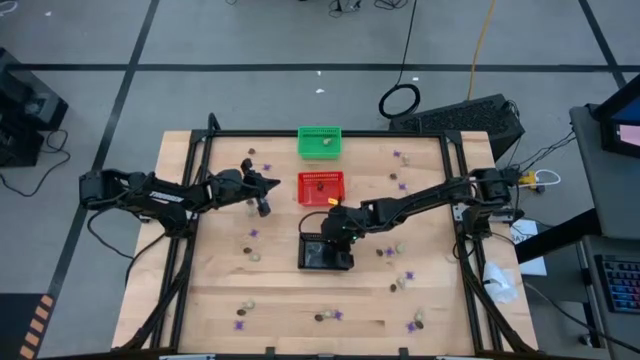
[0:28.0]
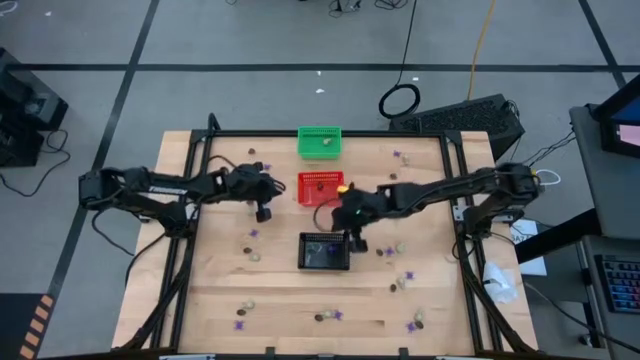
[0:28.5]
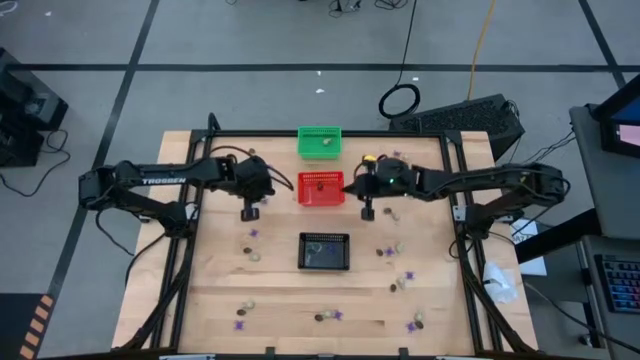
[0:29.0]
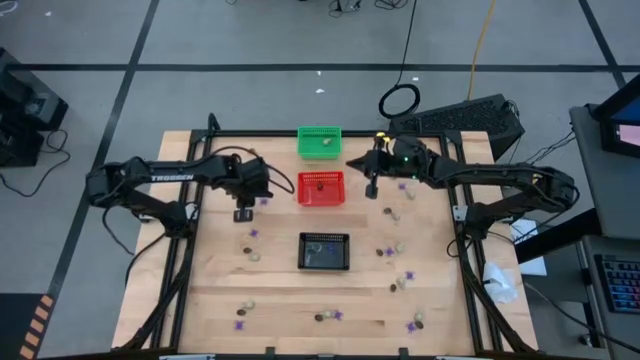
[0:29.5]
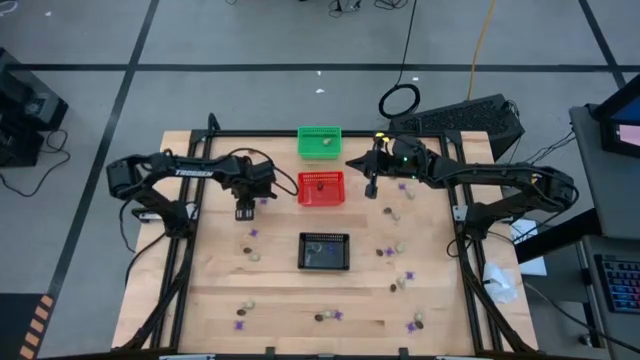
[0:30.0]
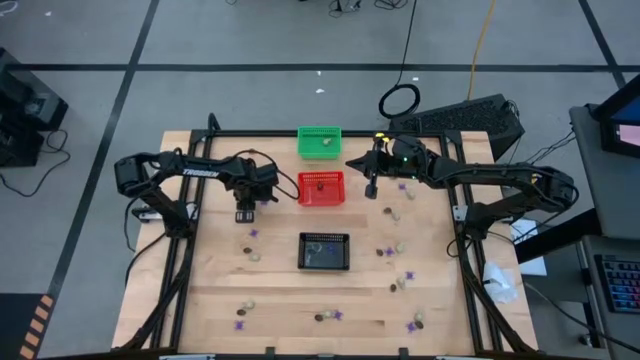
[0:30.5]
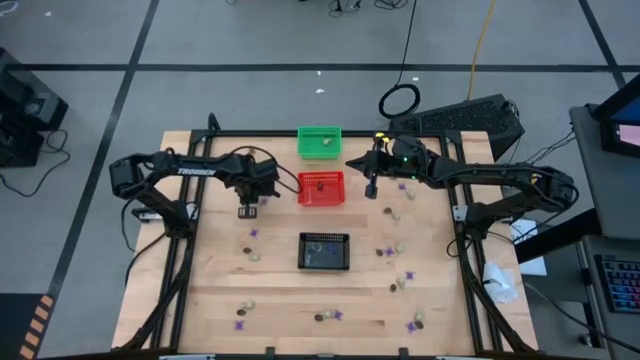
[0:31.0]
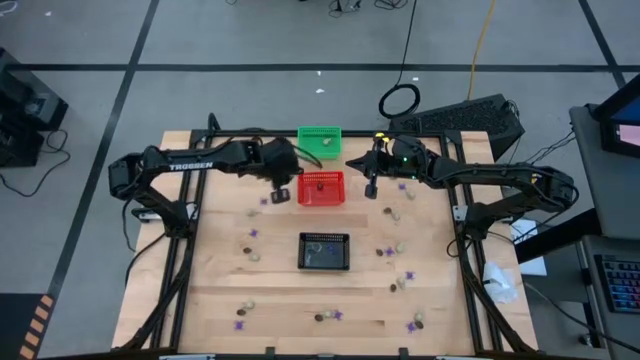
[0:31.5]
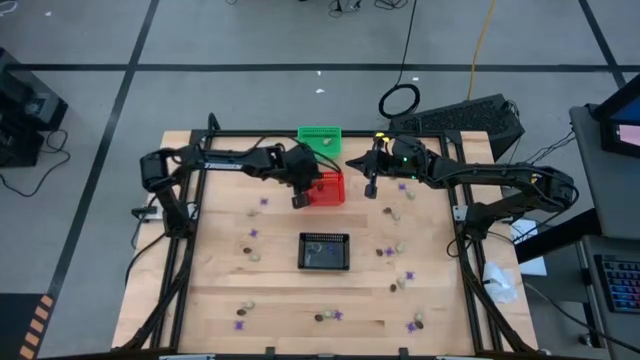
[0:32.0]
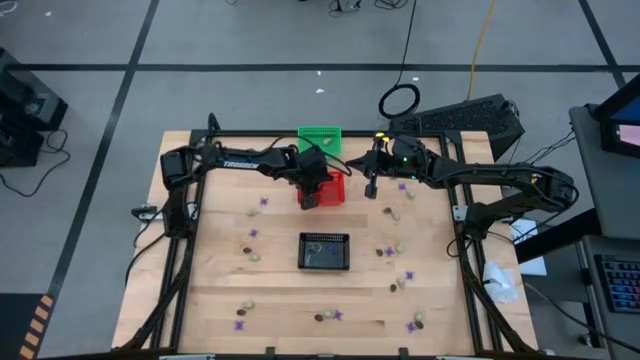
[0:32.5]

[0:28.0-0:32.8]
Task: Sort Halloween decoration
Put the black skull toy into the red basket

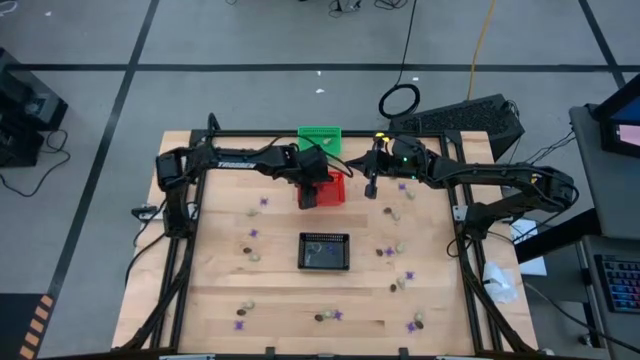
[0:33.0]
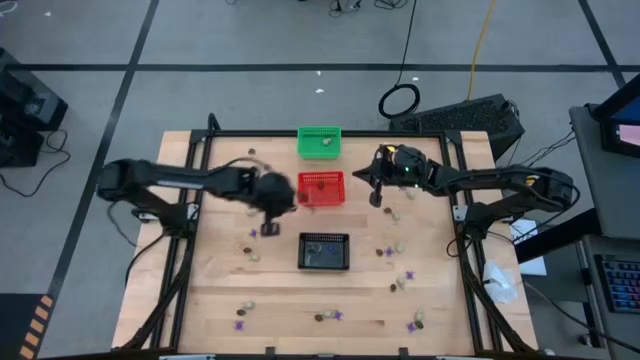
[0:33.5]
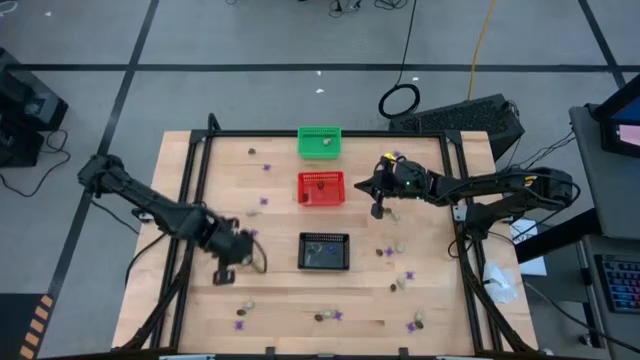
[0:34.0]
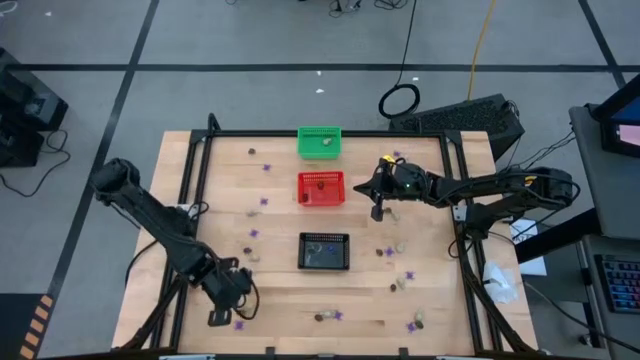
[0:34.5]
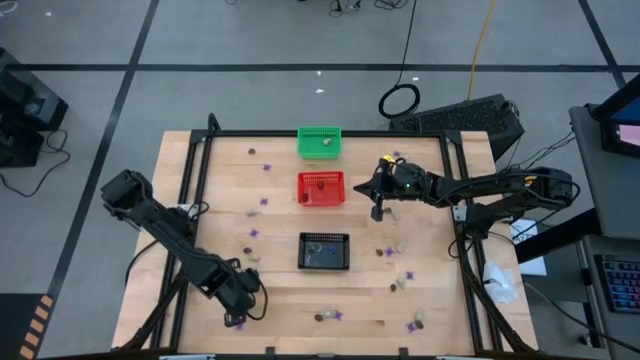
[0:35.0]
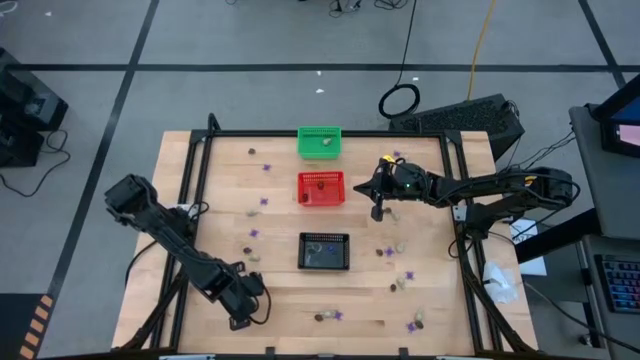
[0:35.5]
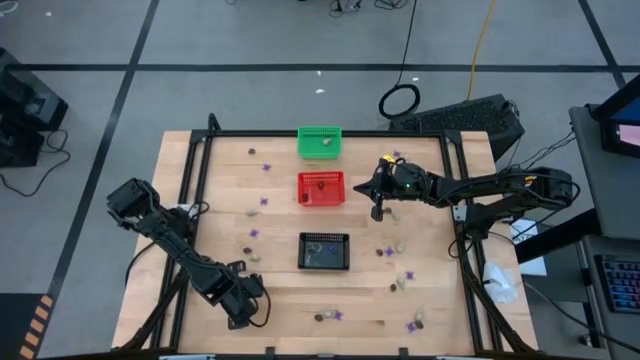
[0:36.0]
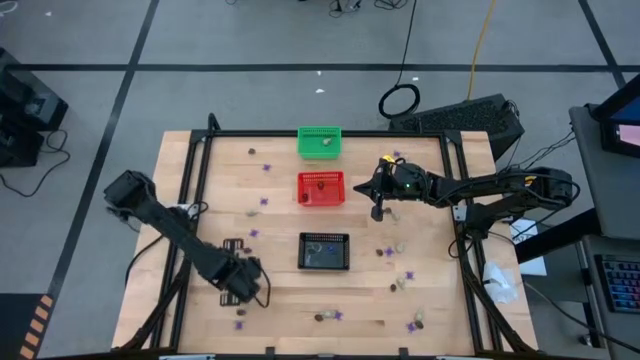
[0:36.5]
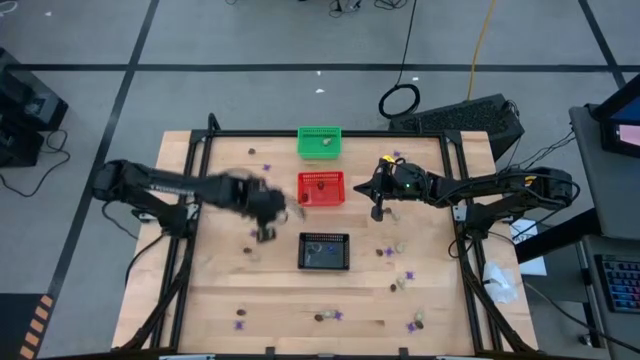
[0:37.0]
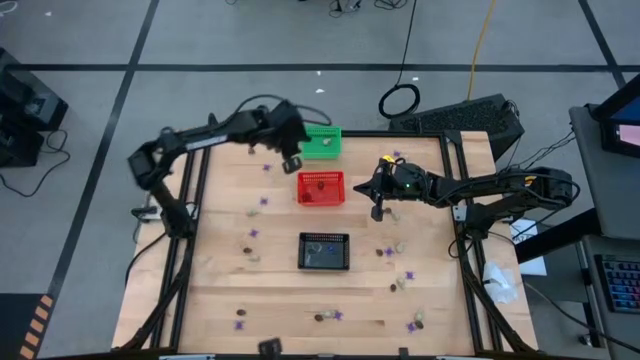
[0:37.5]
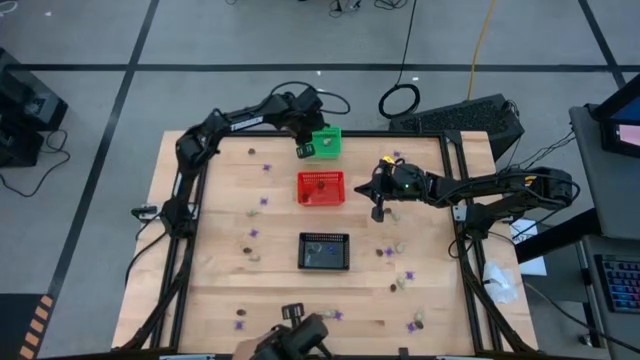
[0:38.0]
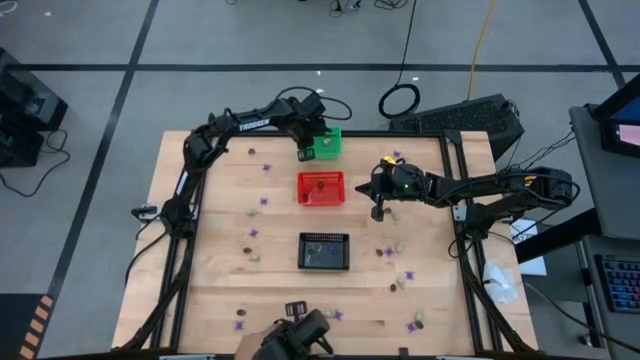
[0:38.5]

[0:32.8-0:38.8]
Put the white skull toy into the green basket

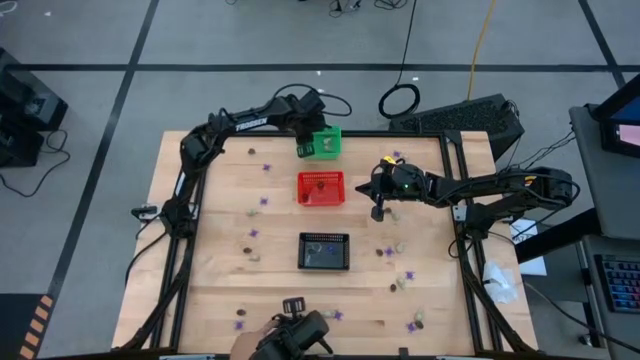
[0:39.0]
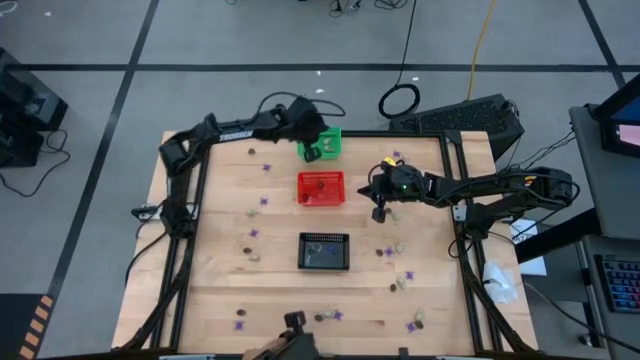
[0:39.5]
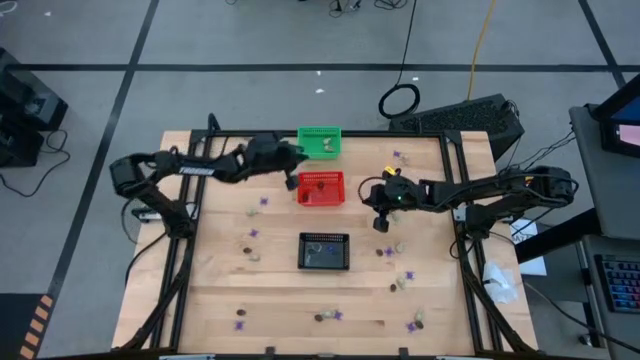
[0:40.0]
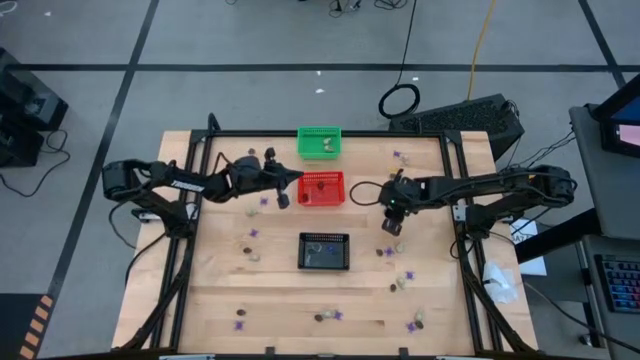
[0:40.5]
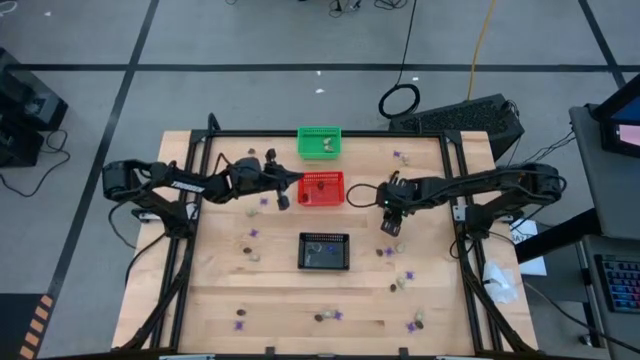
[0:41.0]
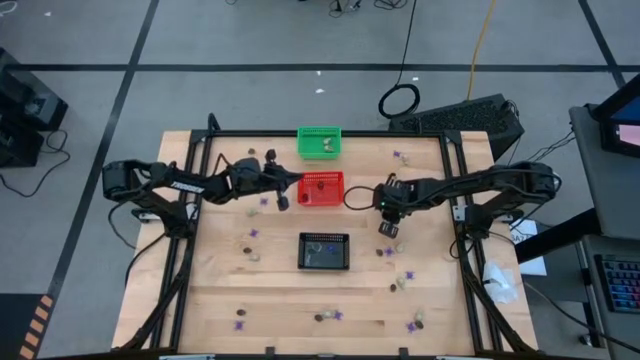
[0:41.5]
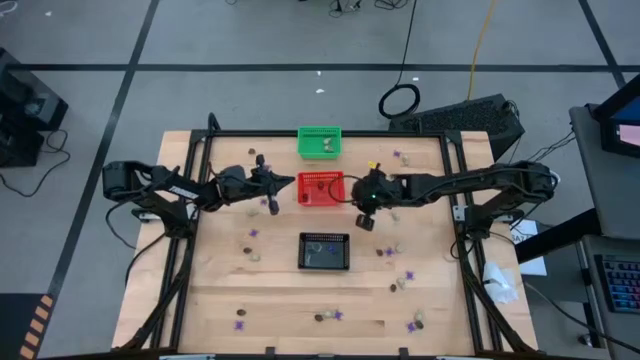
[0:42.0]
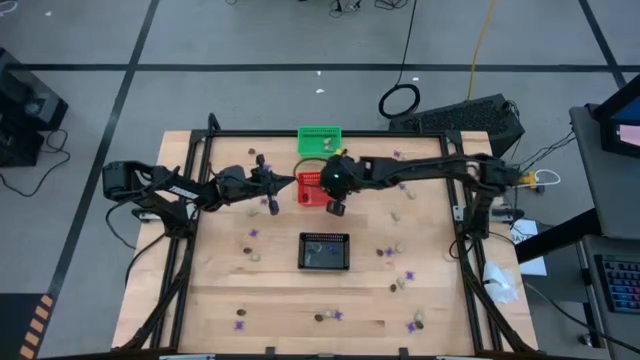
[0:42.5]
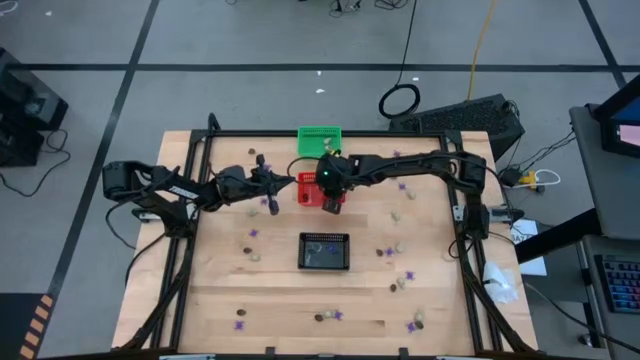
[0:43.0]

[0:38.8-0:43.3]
Put the black skull toy into the red basket

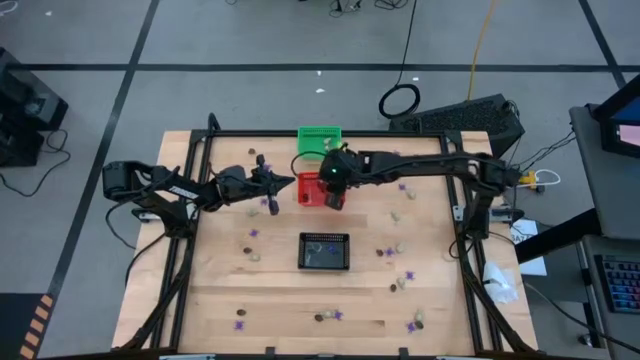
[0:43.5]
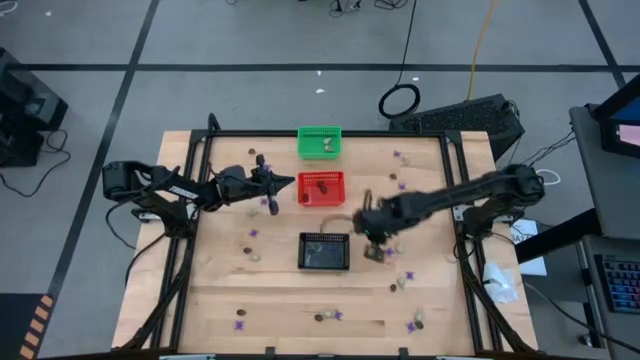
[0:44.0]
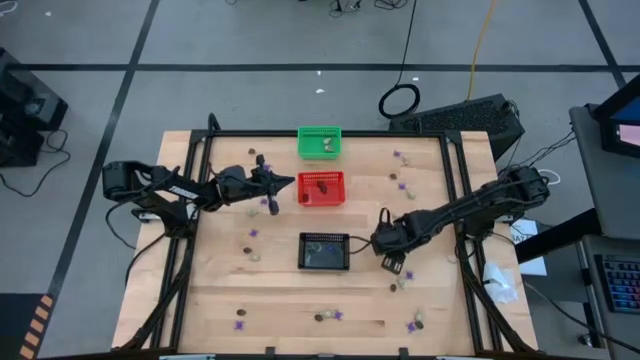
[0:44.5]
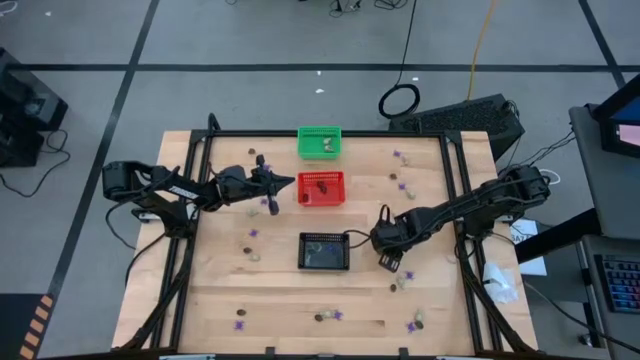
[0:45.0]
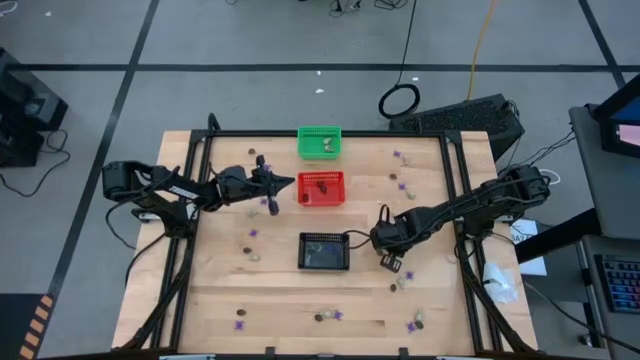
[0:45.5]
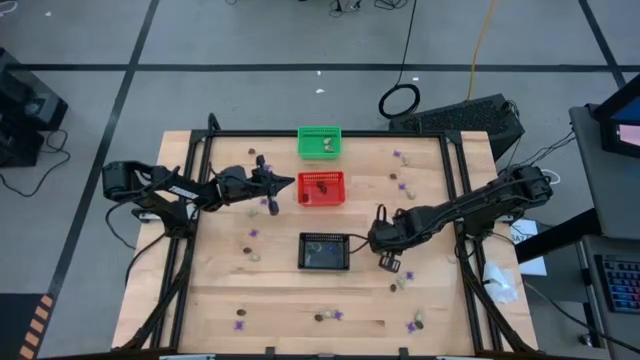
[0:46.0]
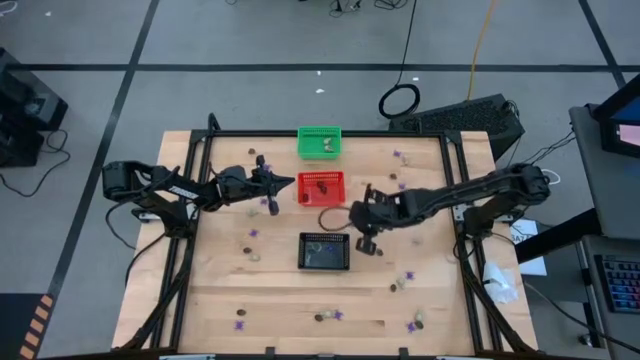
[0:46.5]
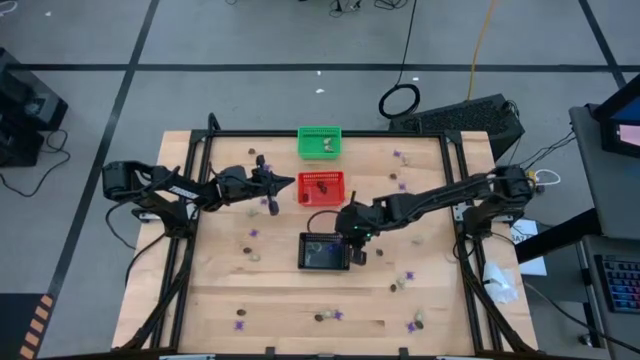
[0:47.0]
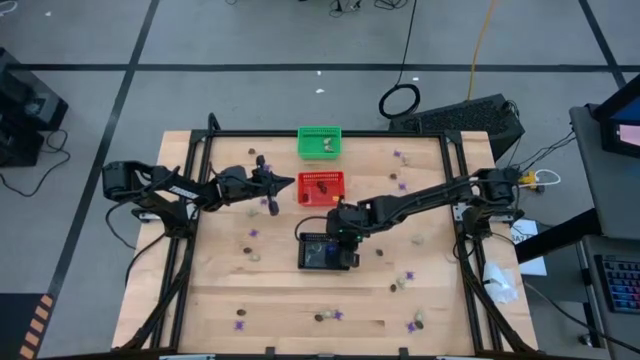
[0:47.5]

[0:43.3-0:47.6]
Put the violet spider toy into the black basket
